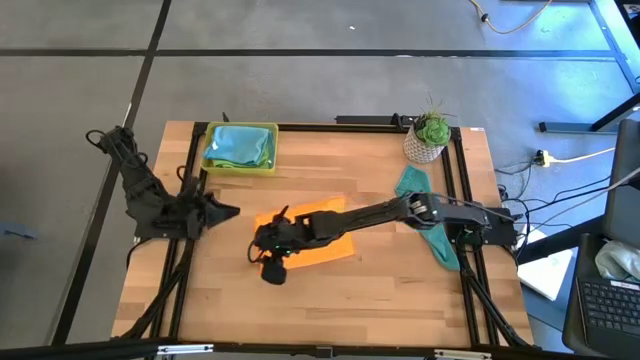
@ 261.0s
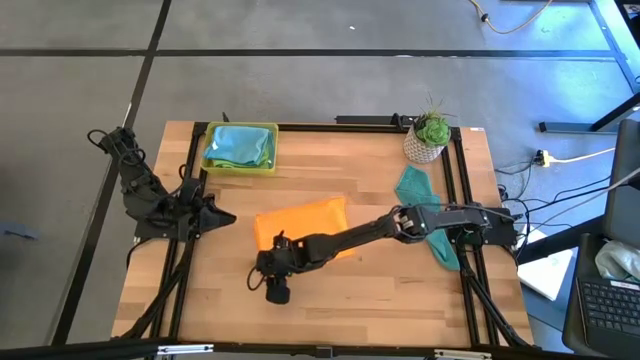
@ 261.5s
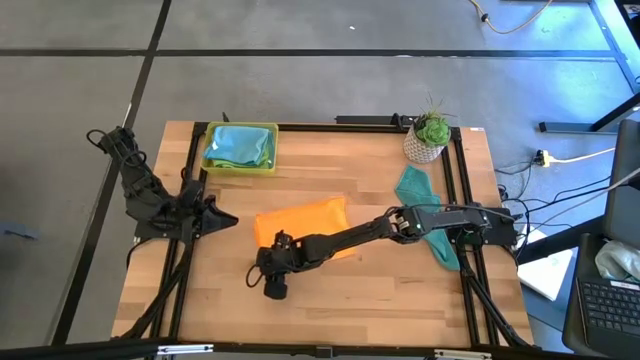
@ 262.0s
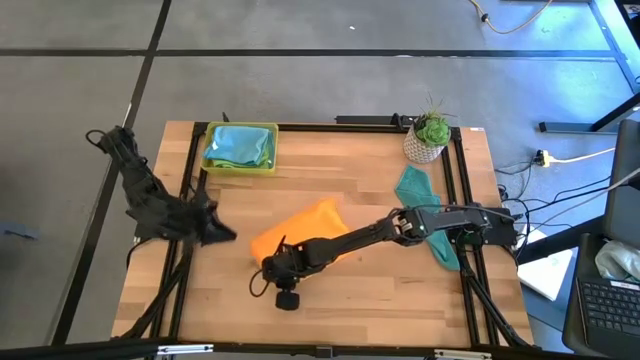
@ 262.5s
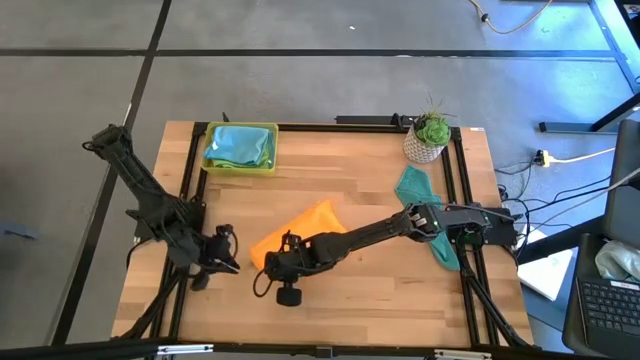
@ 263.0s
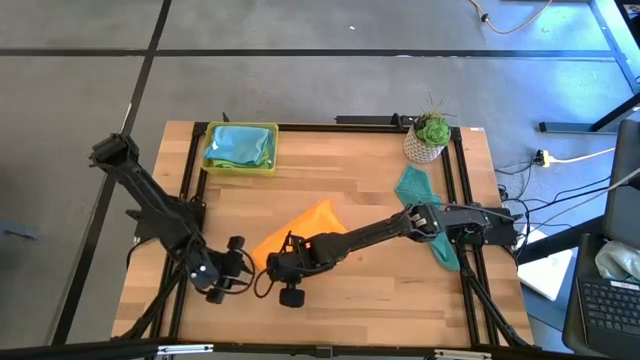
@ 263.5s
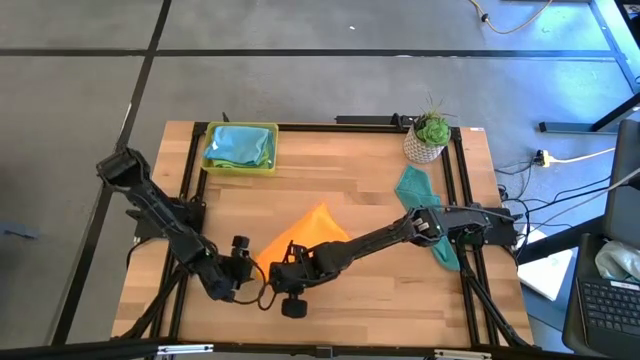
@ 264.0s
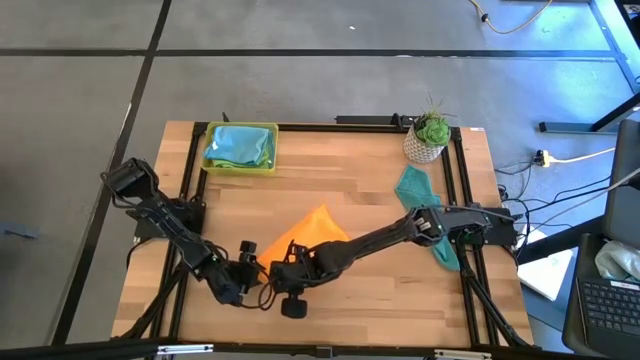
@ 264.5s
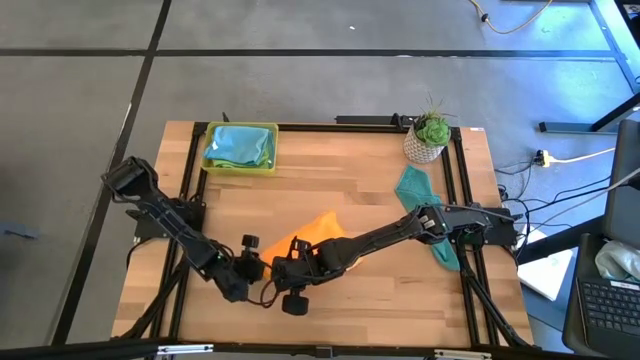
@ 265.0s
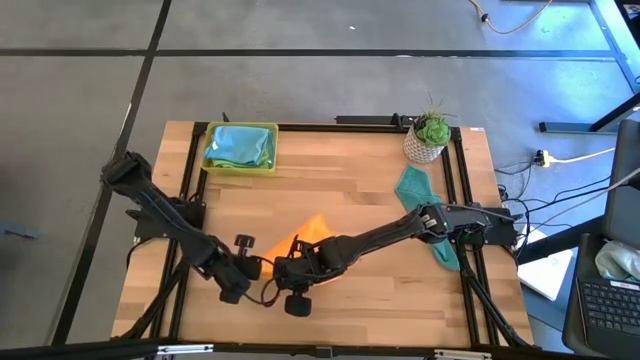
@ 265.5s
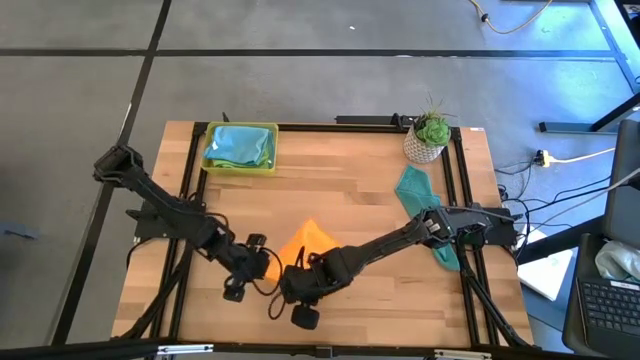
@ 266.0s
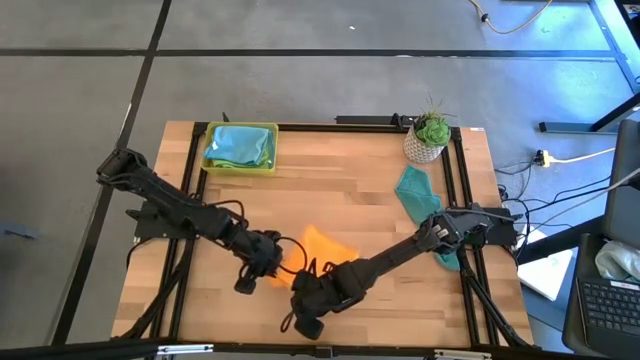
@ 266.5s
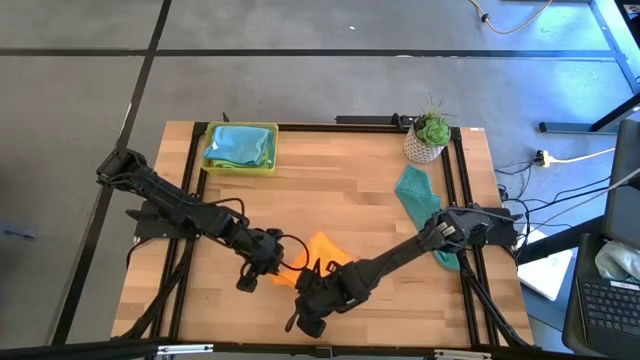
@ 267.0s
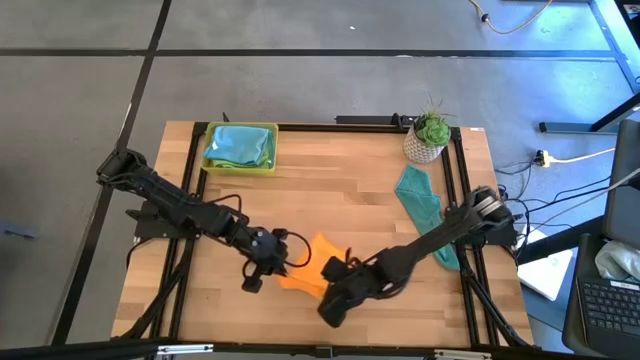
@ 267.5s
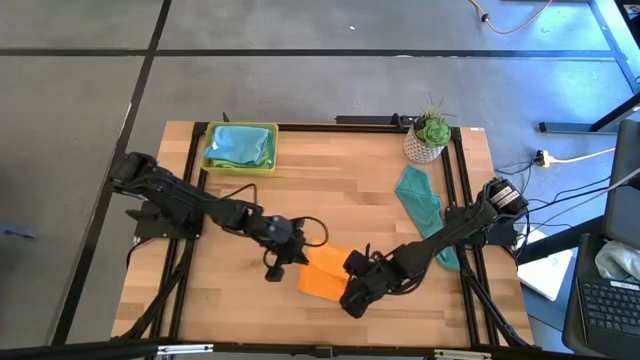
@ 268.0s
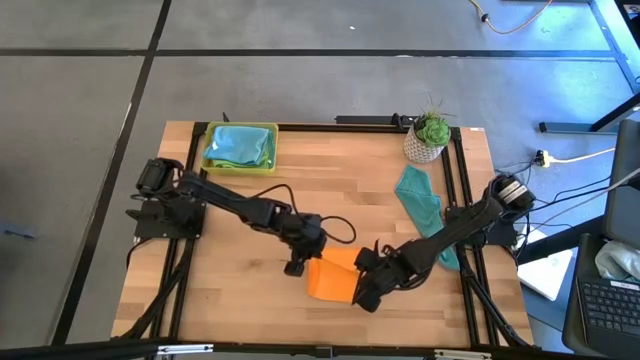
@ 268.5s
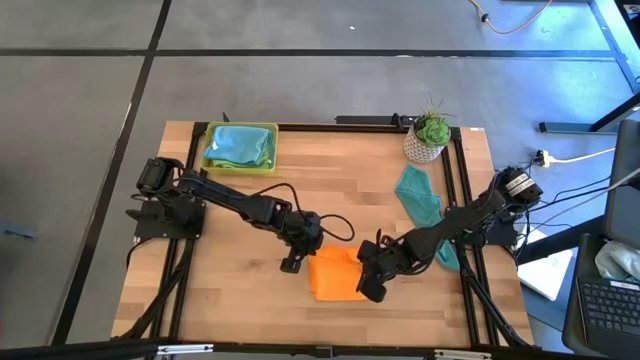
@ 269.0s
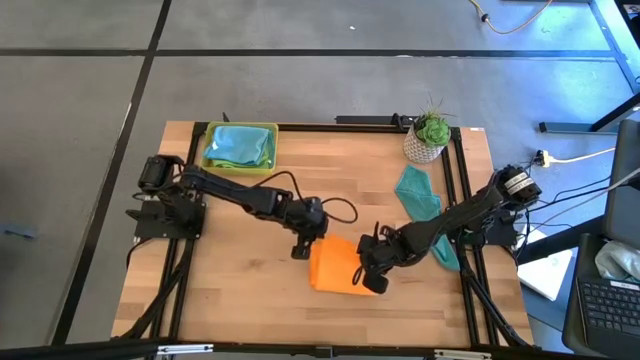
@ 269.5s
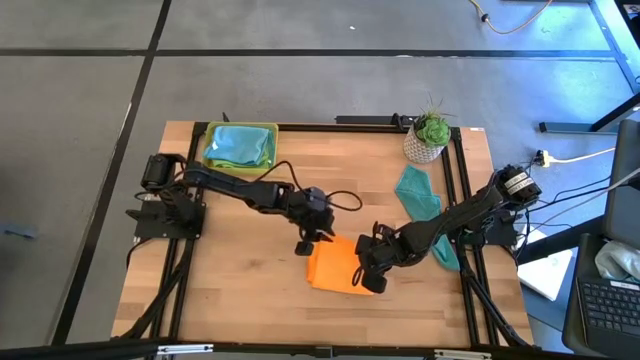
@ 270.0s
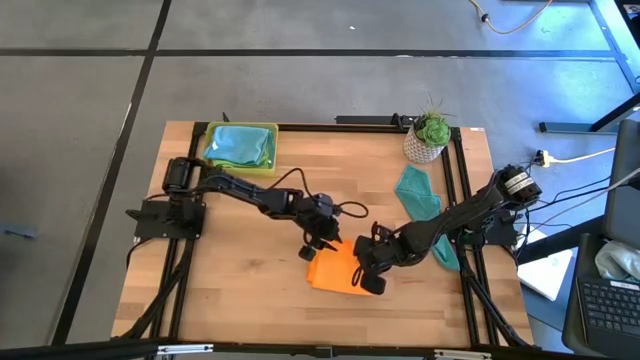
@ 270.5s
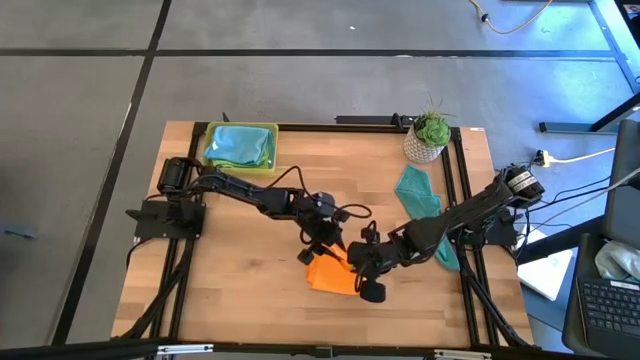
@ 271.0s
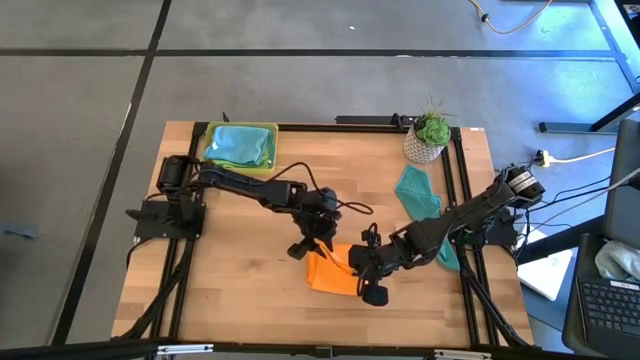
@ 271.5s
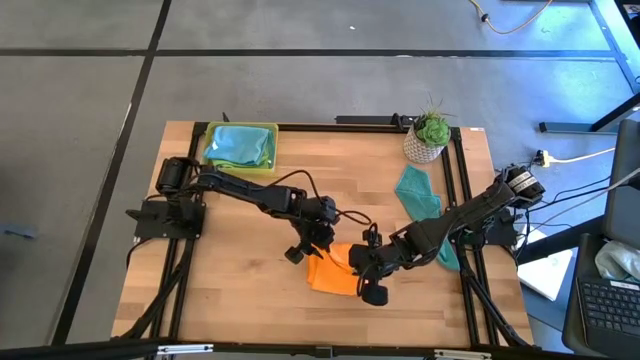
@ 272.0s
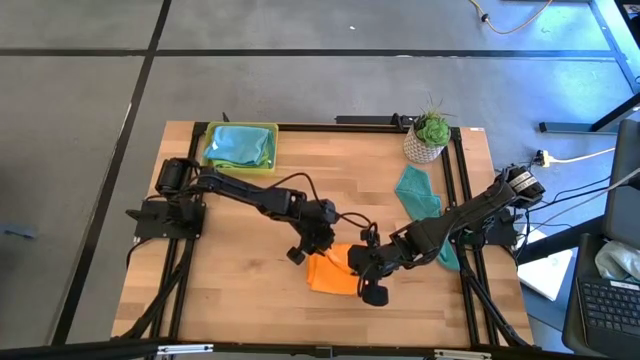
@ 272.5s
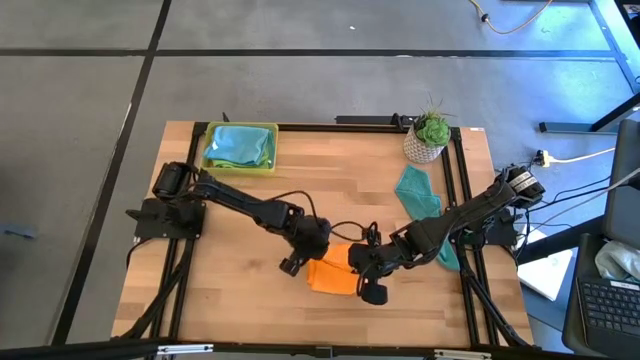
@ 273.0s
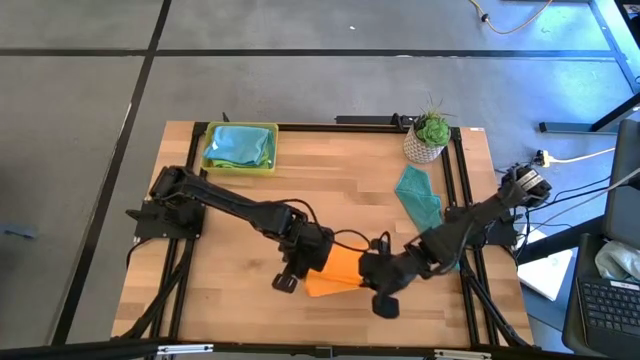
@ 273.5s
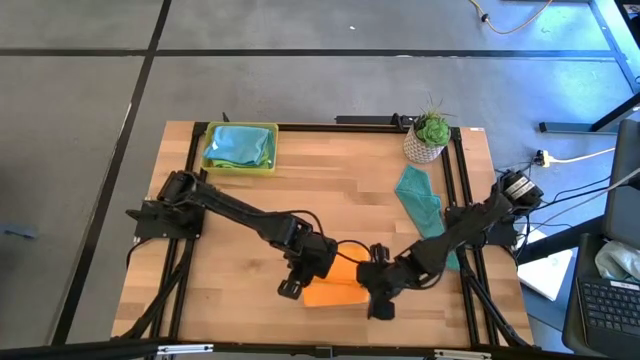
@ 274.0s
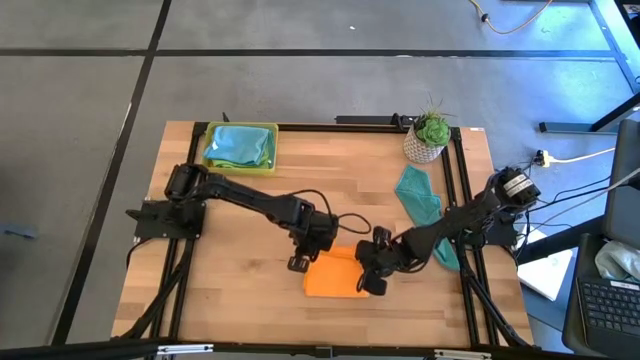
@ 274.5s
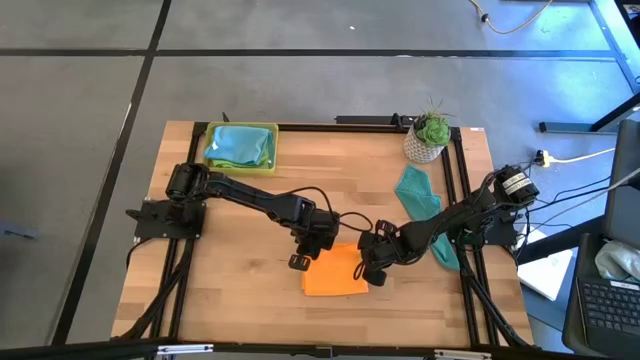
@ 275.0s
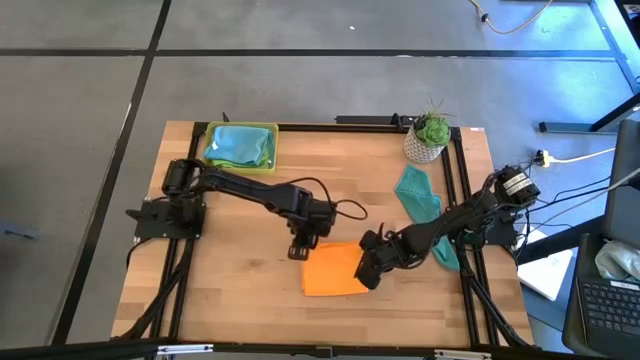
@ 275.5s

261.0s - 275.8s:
Task: Fold microfiber towels
Fold the orange towel

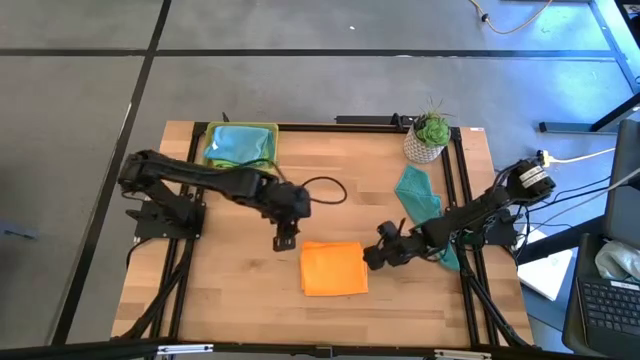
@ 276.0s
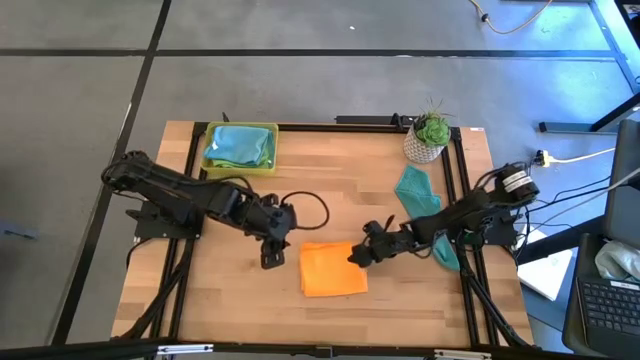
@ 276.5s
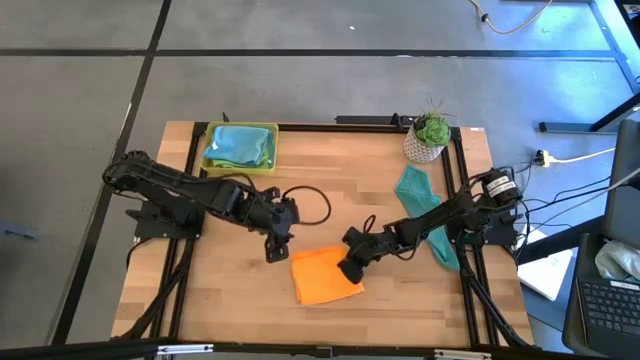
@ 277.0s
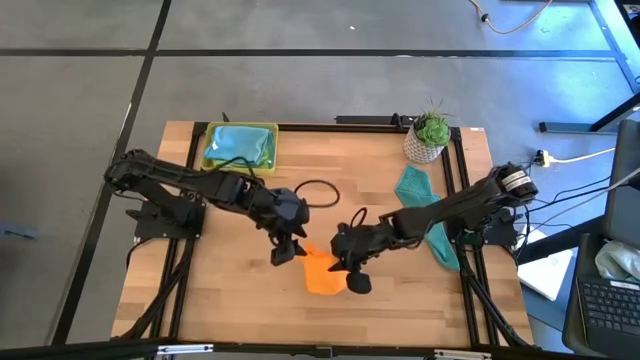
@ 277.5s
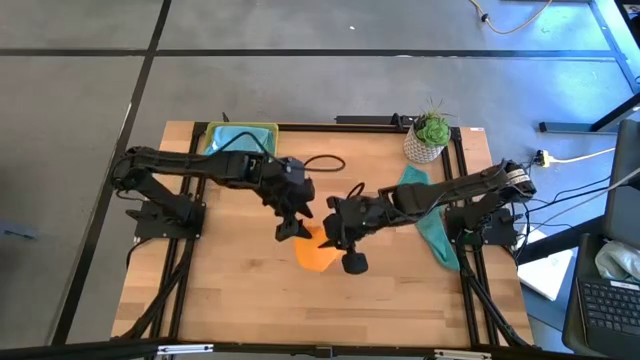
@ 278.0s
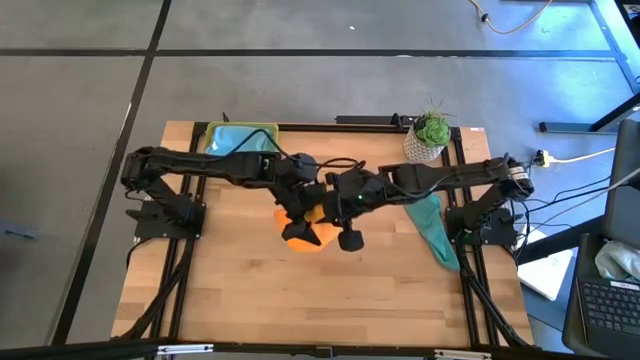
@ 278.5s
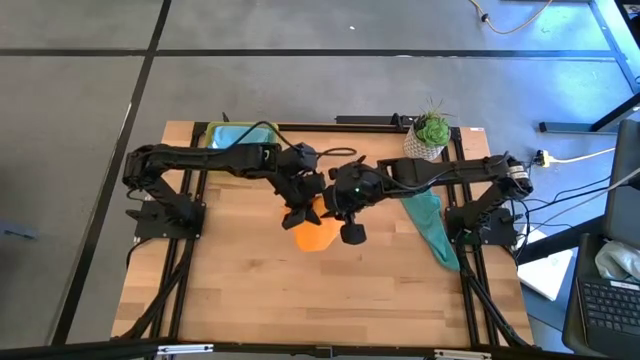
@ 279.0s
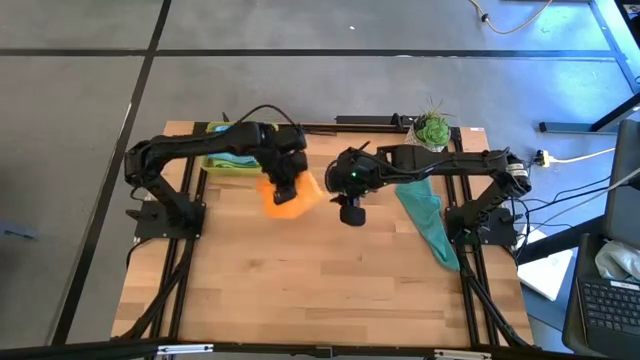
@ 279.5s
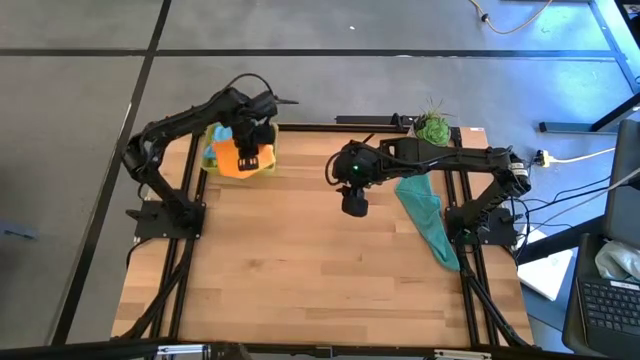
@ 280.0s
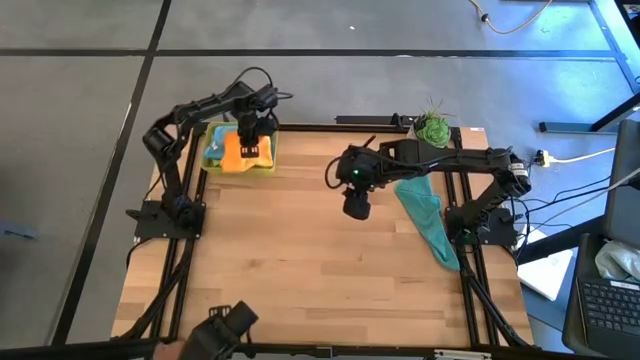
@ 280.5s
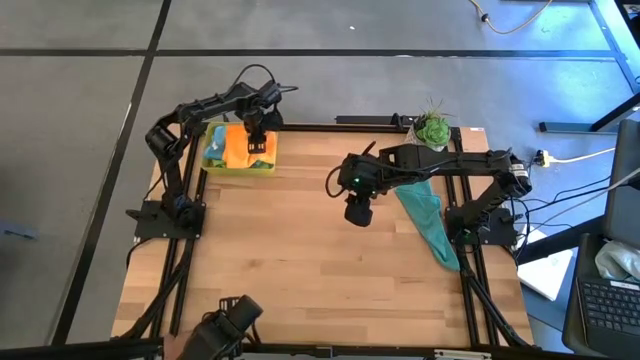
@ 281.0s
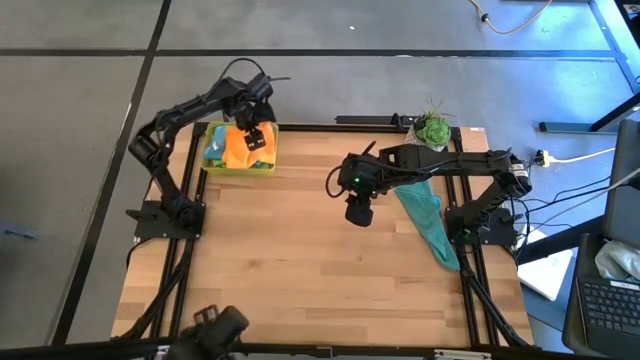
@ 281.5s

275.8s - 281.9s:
Put the folded orange towel into the yellow bin
